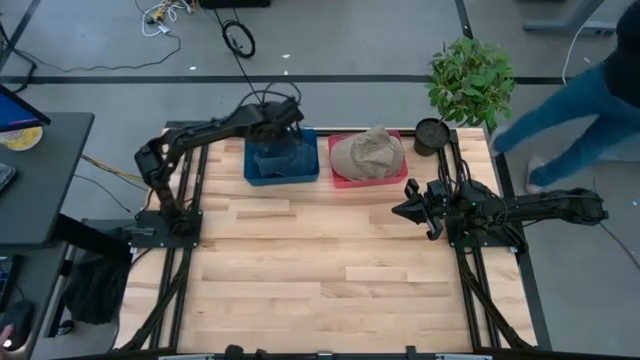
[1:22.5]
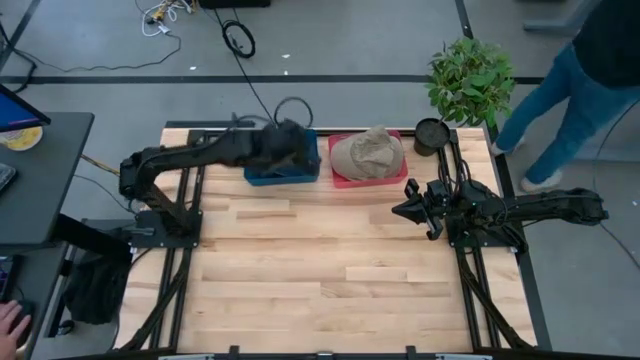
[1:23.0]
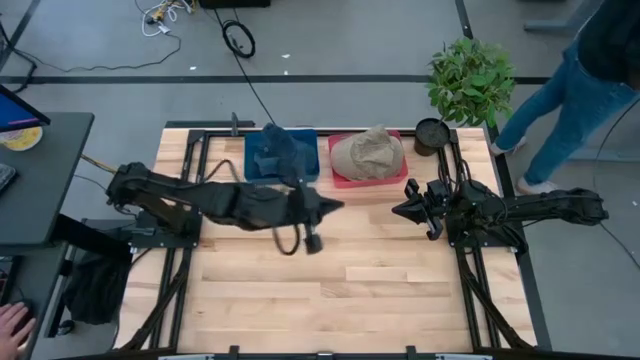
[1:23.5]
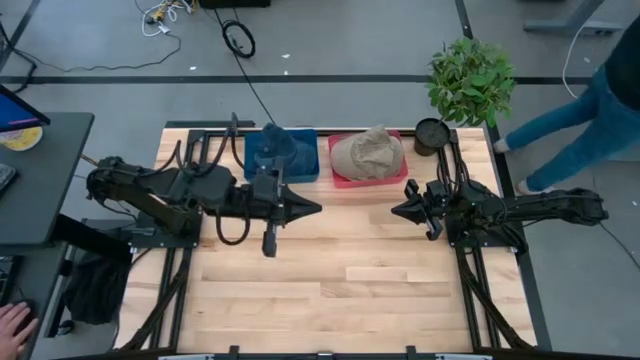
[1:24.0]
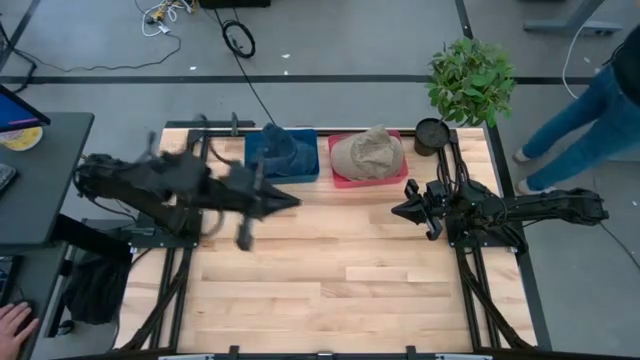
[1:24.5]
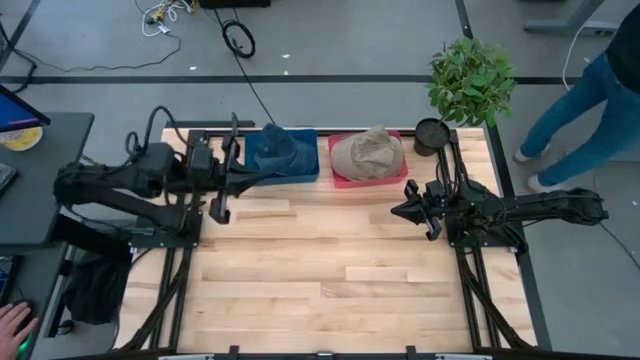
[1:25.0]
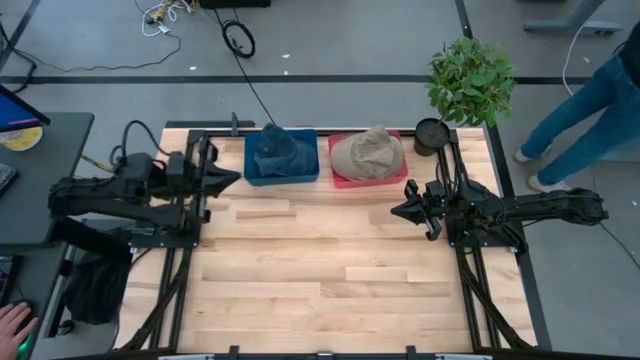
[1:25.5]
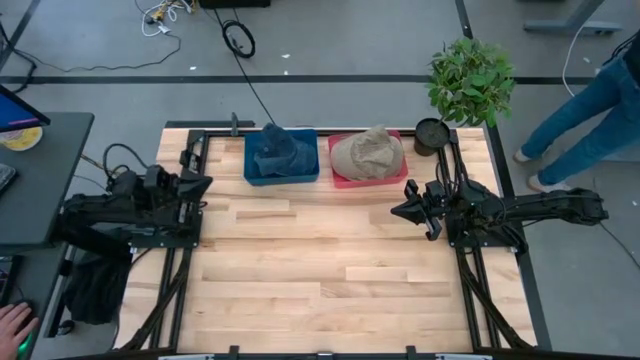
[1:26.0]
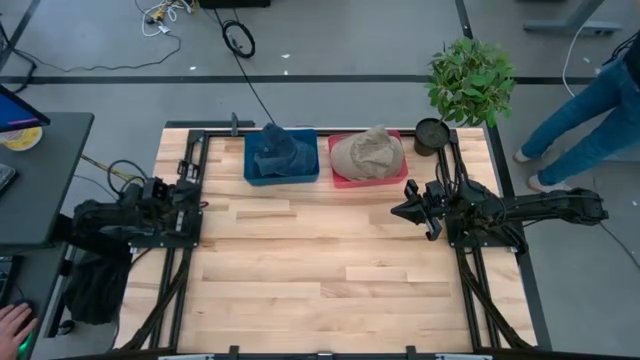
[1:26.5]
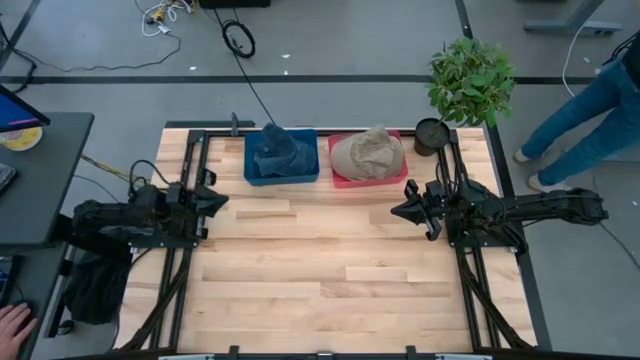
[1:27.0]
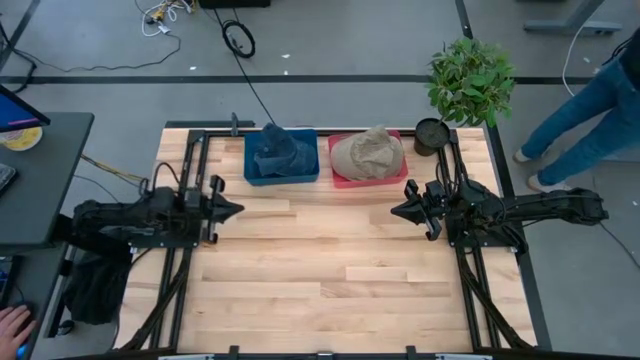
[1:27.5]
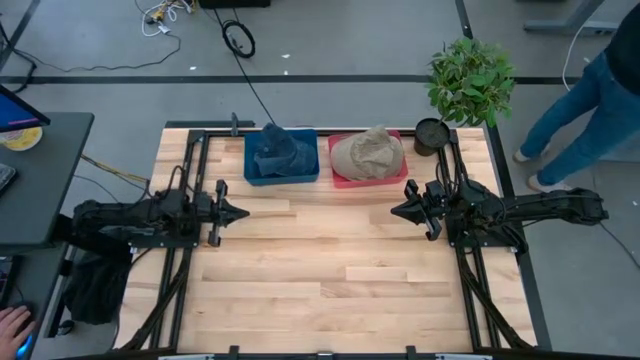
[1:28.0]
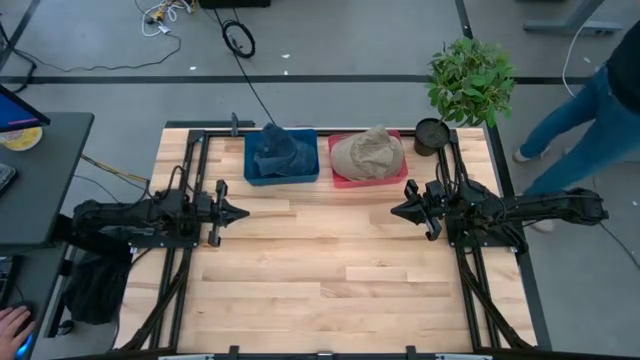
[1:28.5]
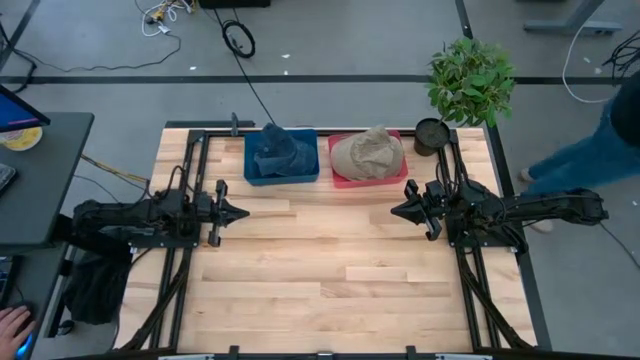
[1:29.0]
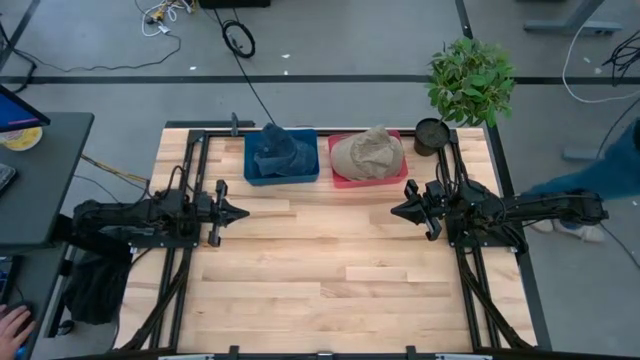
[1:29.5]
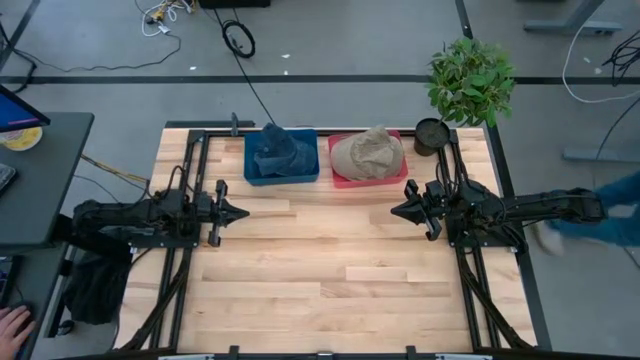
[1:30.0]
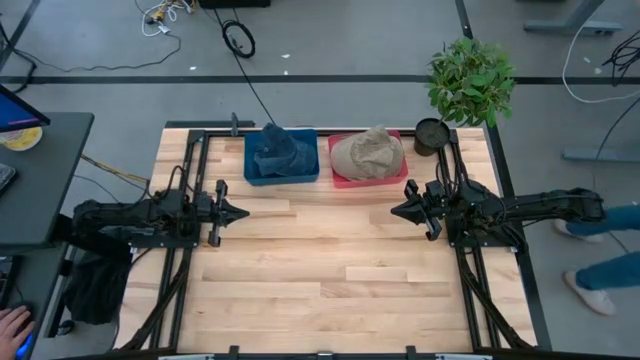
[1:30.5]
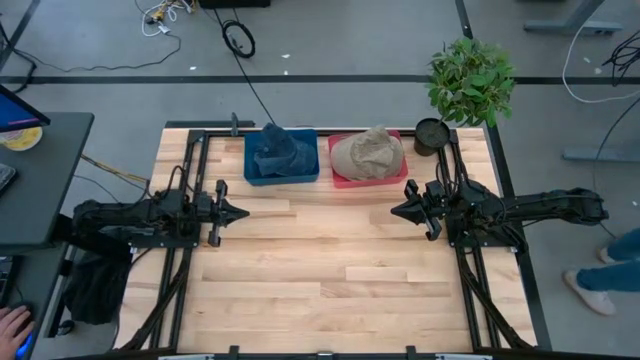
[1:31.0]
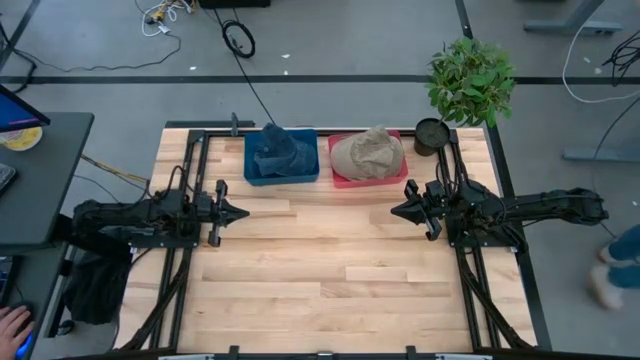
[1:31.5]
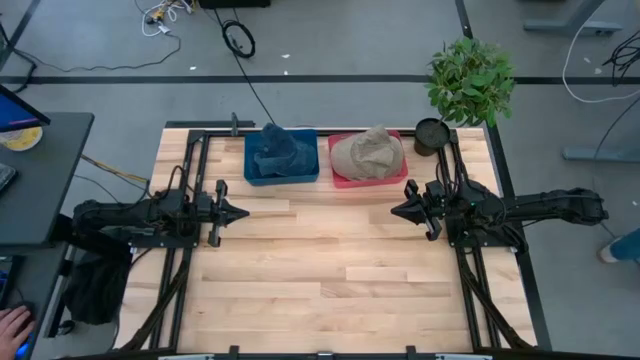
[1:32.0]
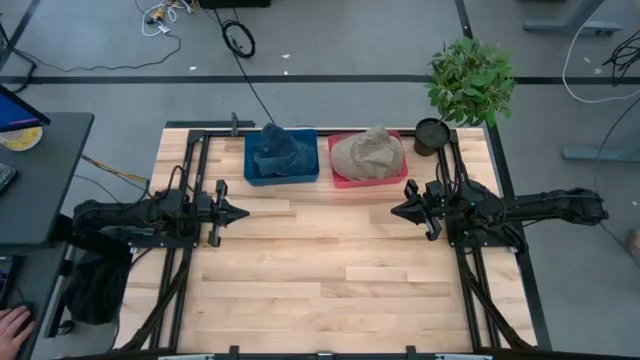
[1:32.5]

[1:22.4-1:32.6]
Task: Pick & Place hat
Return to Home Position

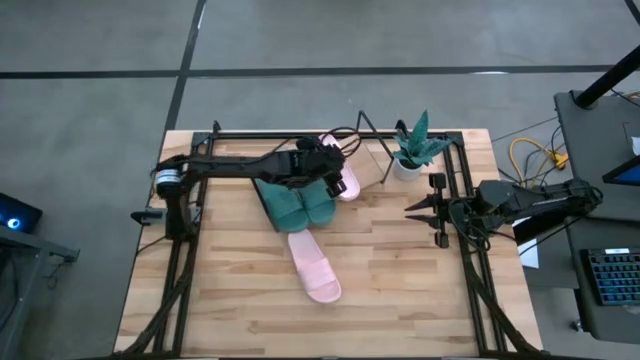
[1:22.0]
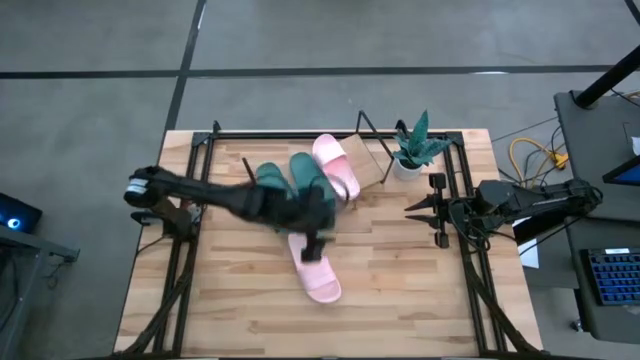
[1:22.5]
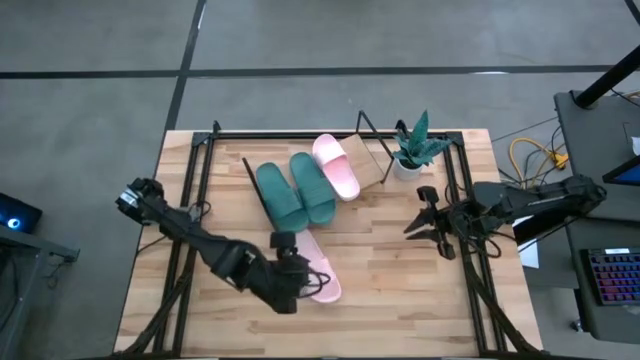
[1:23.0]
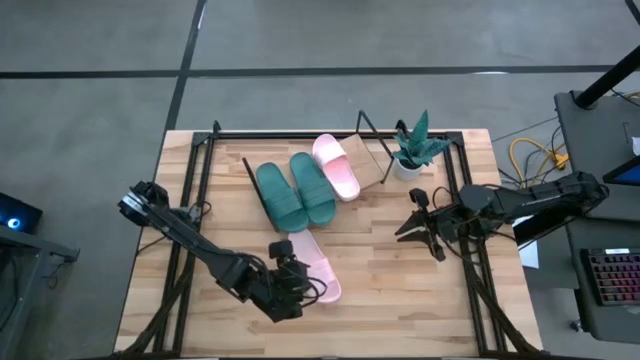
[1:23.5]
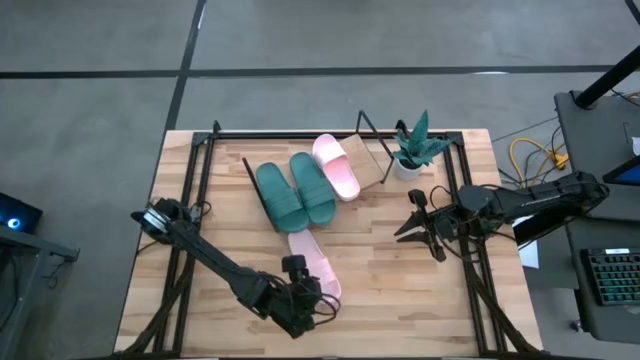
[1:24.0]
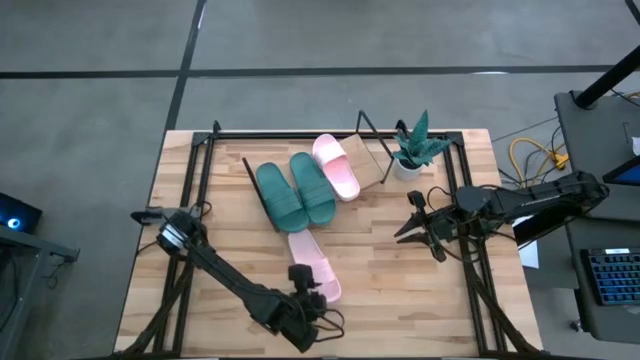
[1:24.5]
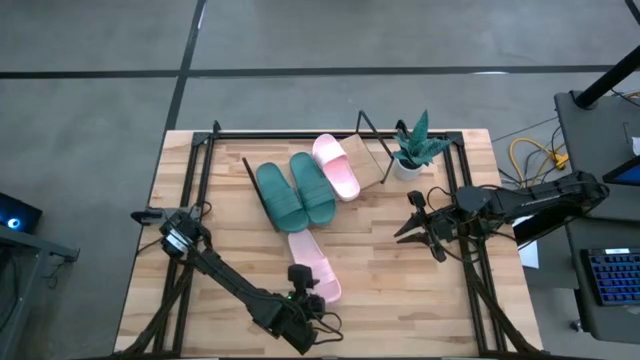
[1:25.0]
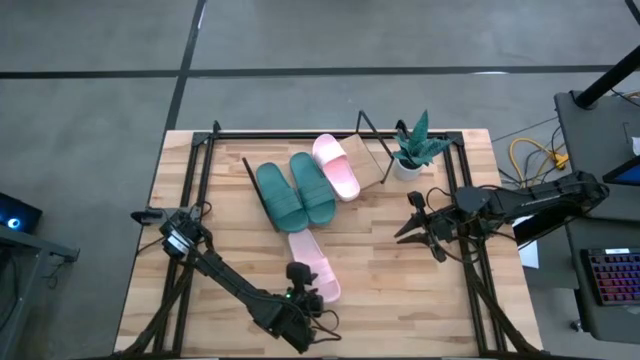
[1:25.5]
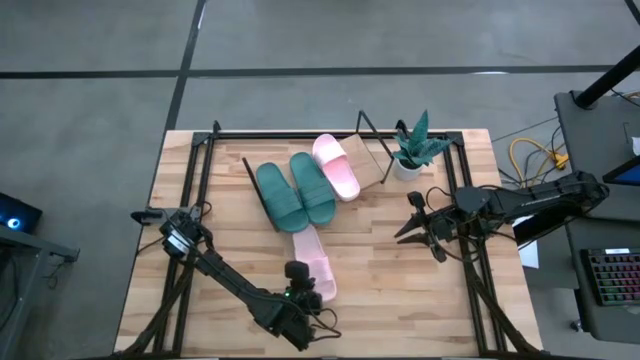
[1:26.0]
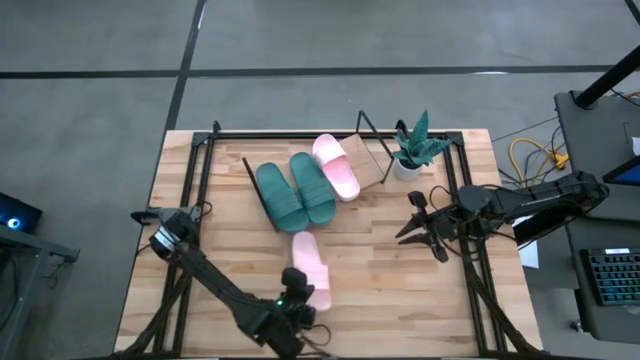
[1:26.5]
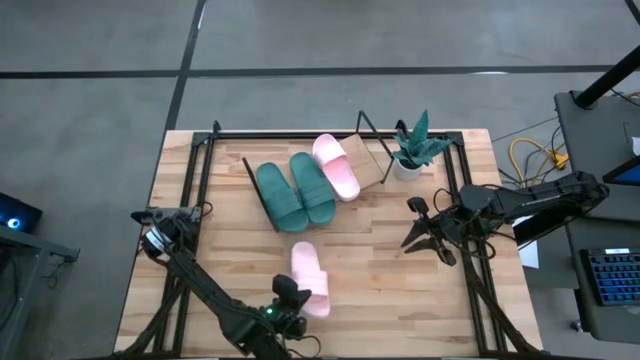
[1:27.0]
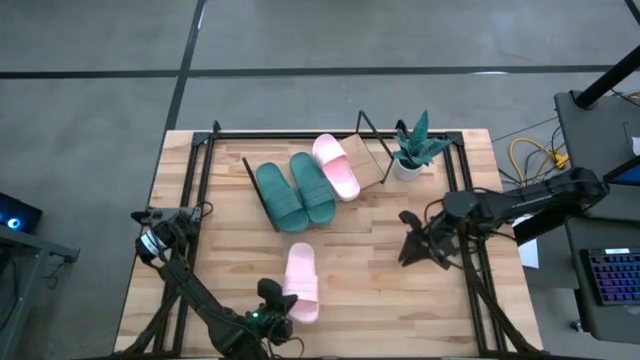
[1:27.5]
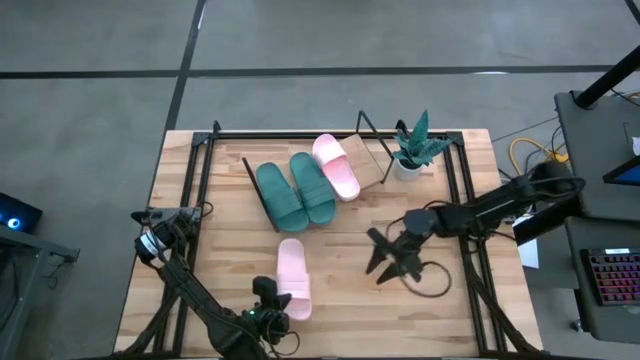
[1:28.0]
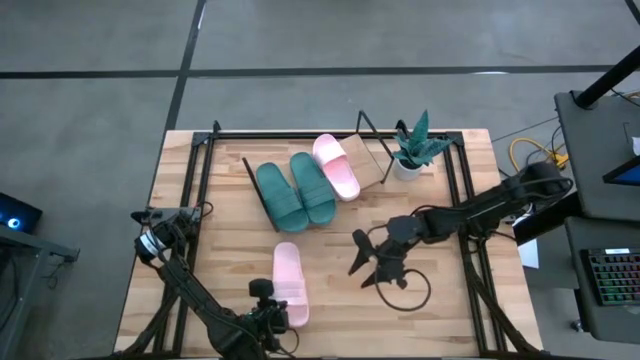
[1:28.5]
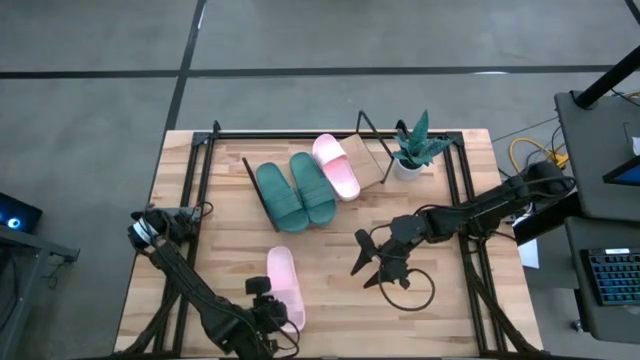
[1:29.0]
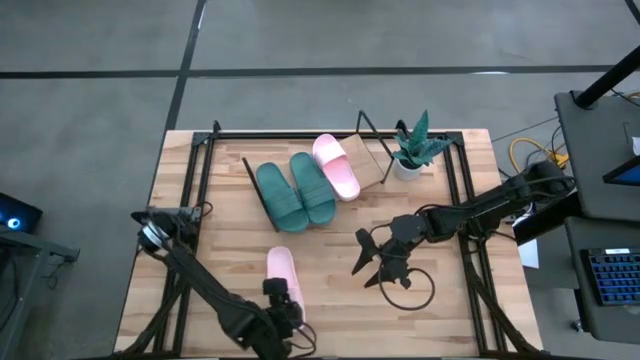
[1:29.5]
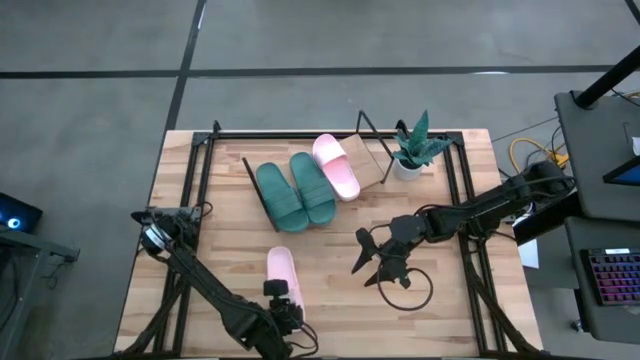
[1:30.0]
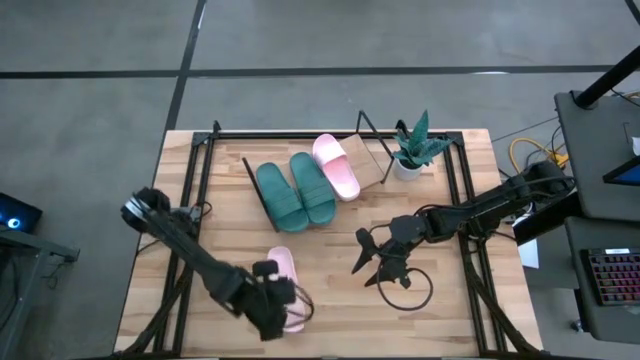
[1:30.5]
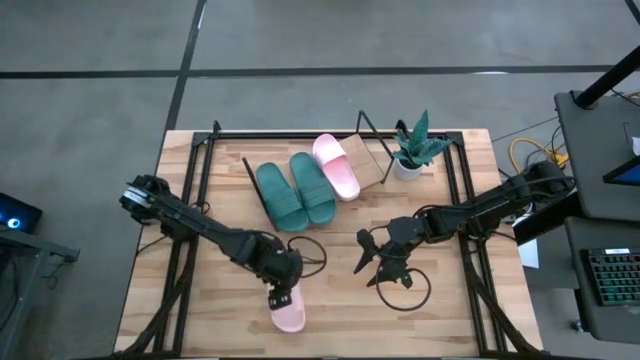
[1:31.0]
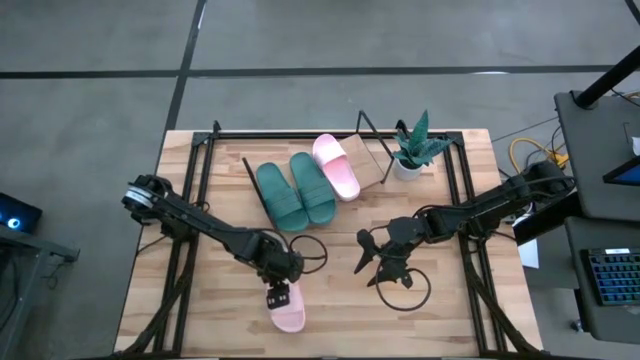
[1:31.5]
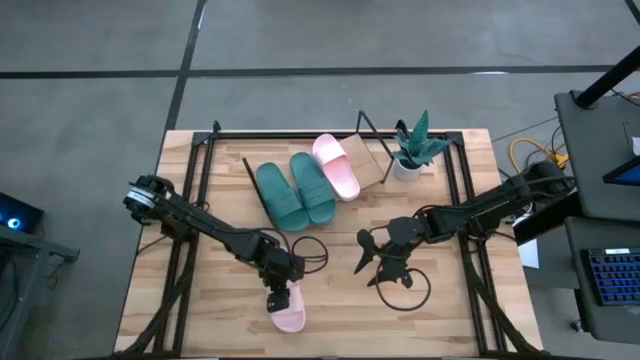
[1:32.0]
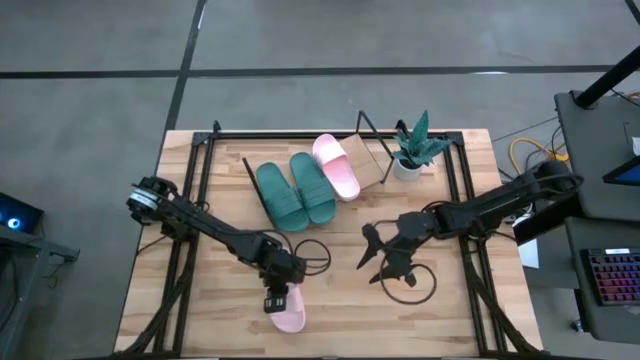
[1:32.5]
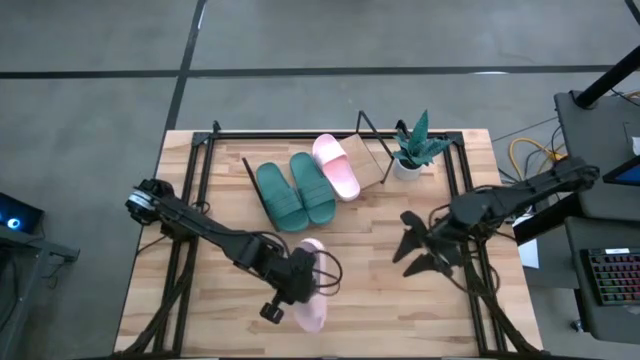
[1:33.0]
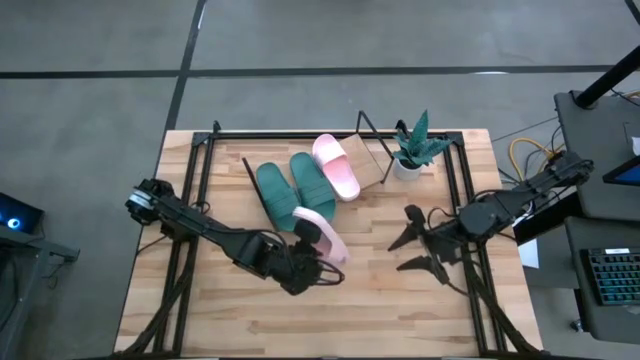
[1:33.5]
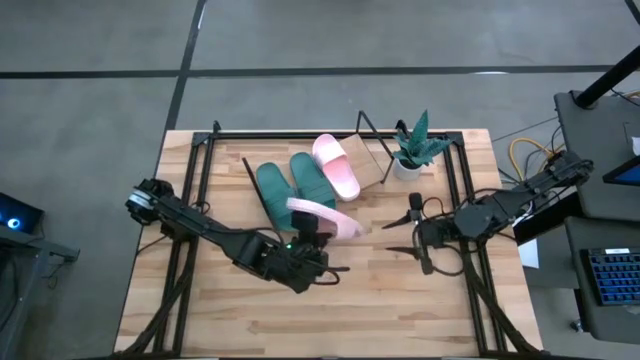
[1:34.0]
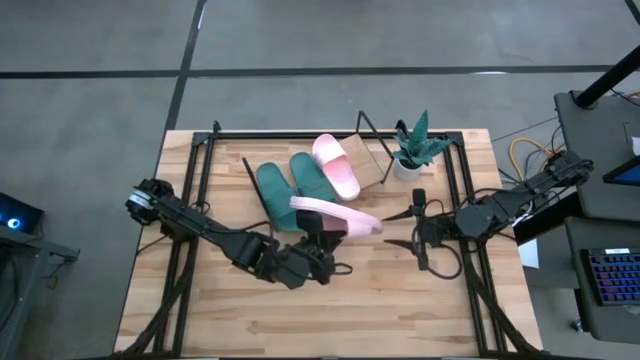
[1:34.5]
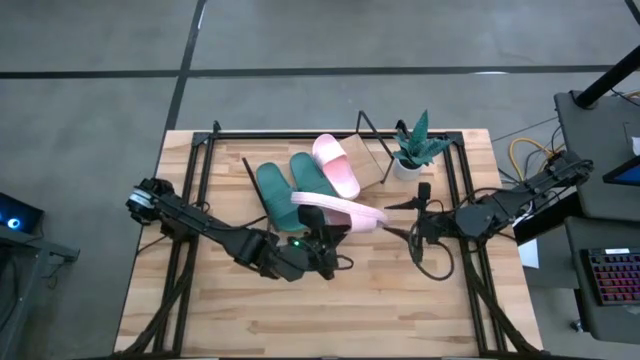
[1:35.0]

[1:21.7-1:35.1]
Task: Pick and place slides into the shelf
Put the pink slide on the shelf
